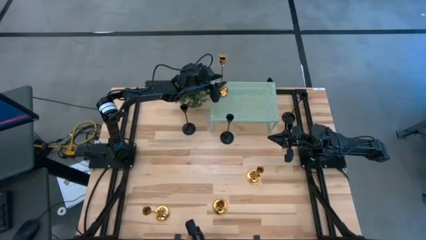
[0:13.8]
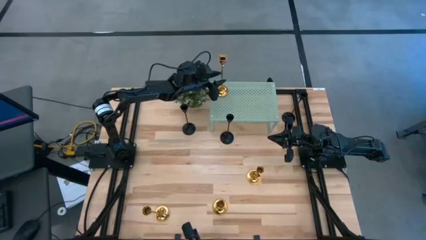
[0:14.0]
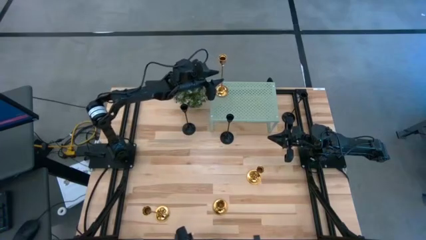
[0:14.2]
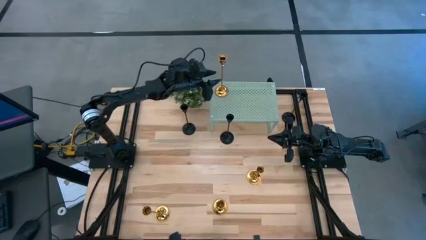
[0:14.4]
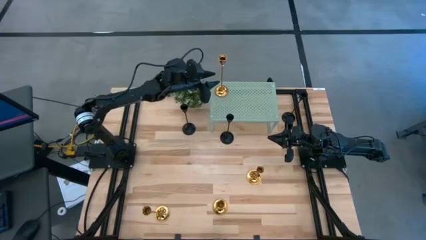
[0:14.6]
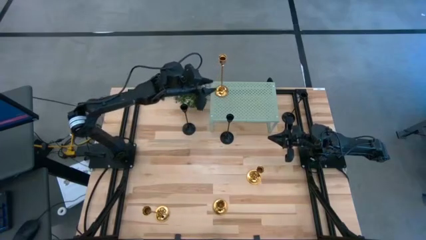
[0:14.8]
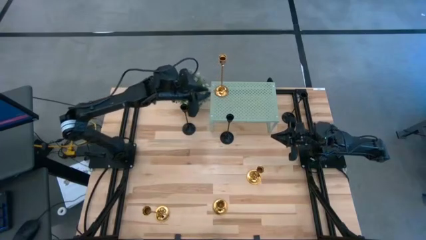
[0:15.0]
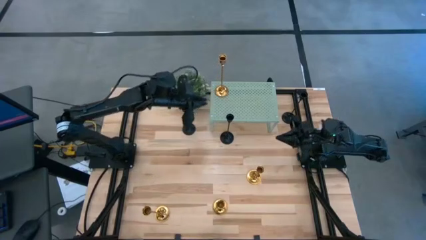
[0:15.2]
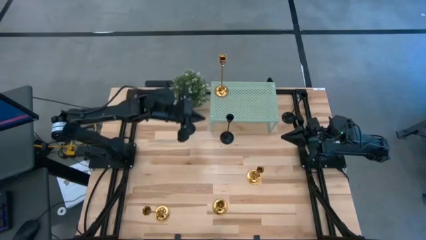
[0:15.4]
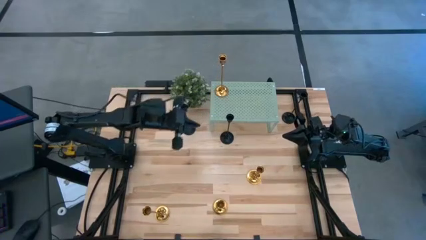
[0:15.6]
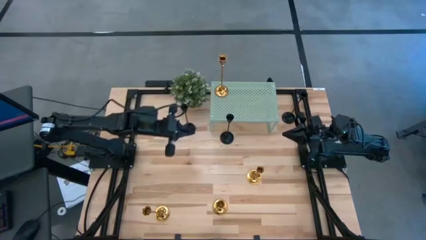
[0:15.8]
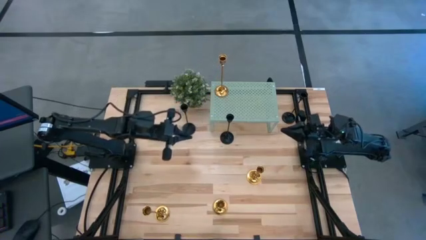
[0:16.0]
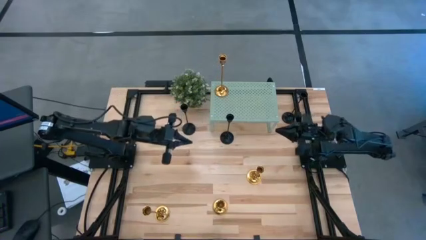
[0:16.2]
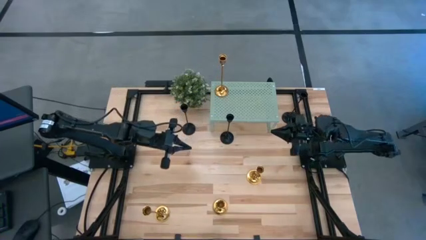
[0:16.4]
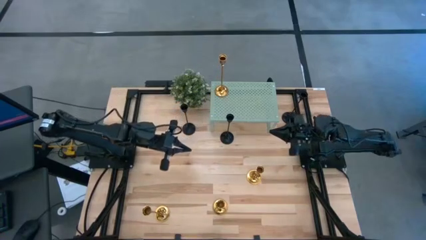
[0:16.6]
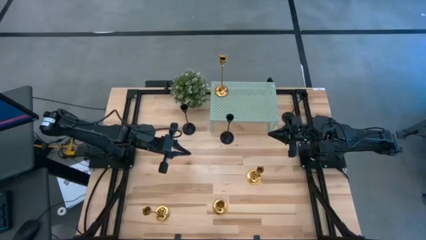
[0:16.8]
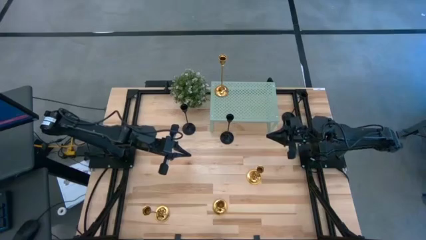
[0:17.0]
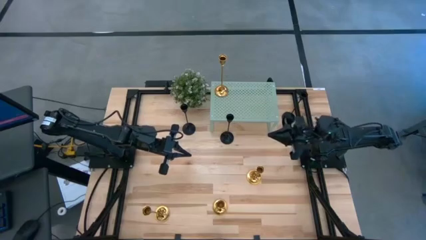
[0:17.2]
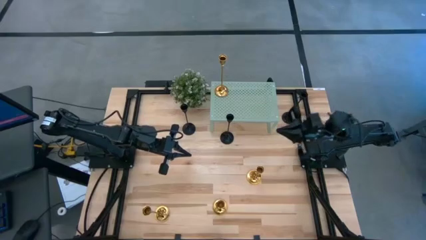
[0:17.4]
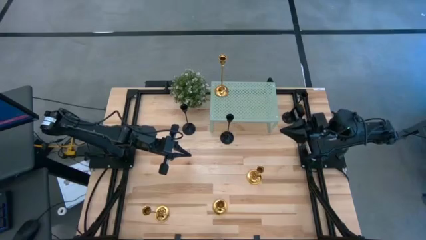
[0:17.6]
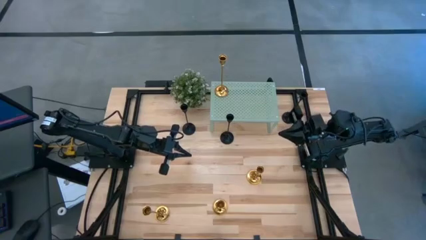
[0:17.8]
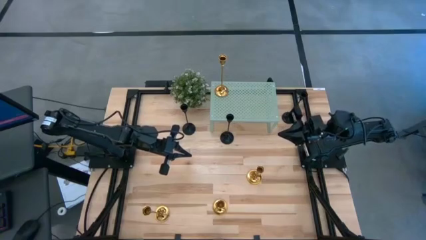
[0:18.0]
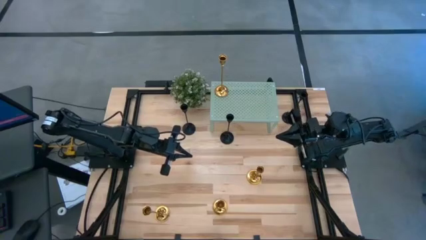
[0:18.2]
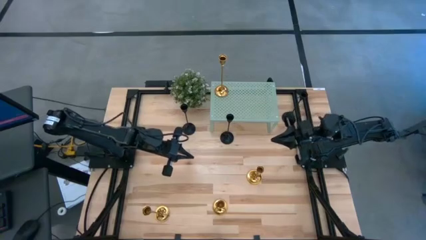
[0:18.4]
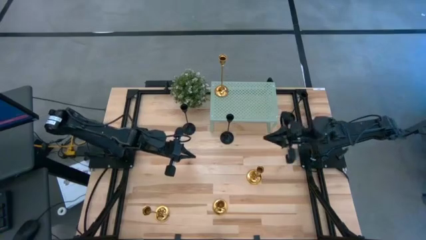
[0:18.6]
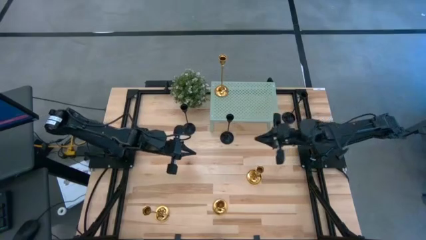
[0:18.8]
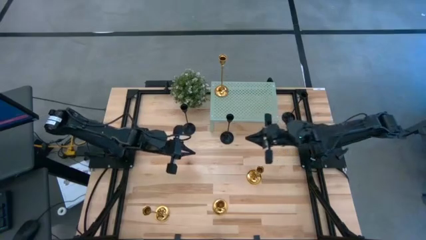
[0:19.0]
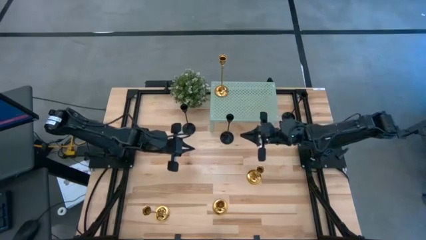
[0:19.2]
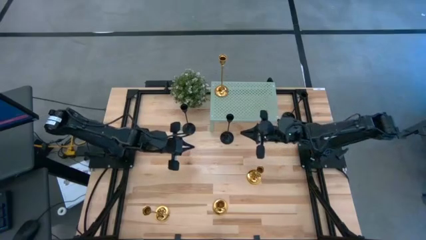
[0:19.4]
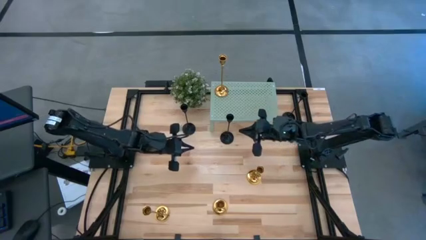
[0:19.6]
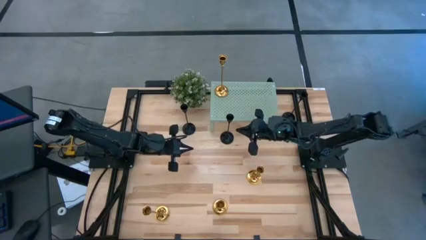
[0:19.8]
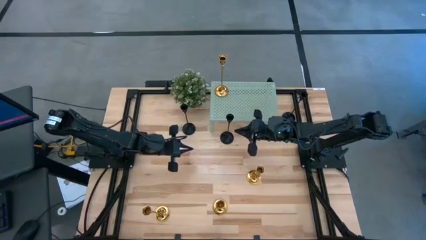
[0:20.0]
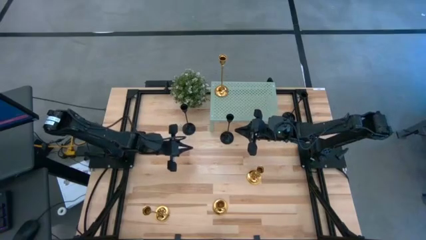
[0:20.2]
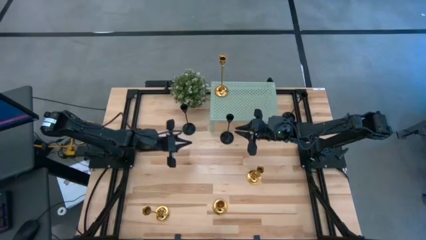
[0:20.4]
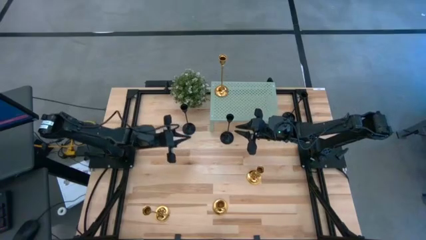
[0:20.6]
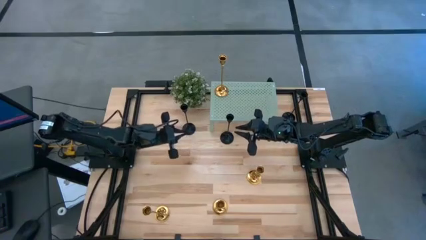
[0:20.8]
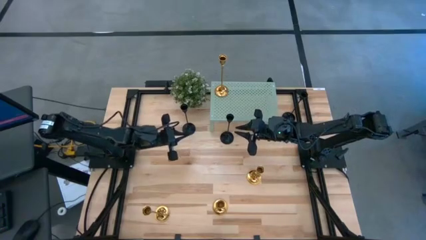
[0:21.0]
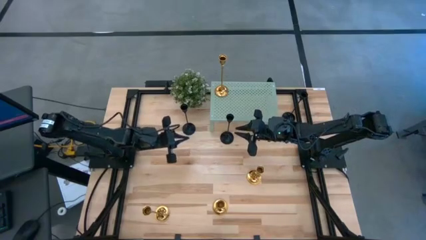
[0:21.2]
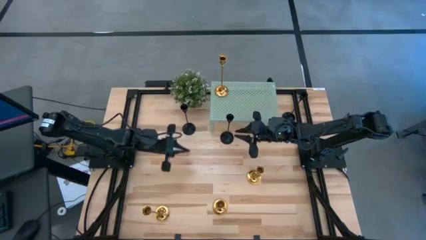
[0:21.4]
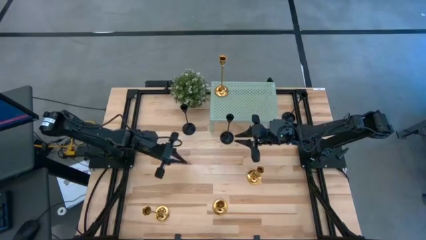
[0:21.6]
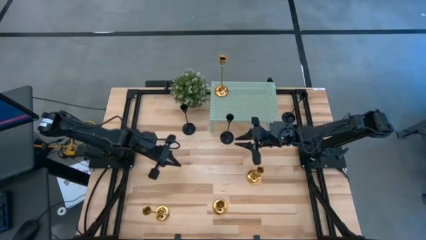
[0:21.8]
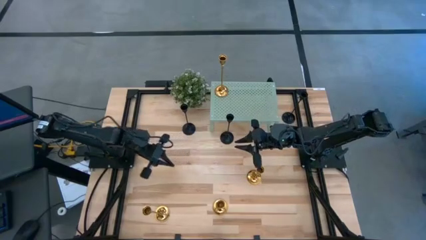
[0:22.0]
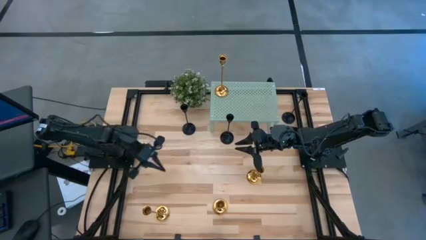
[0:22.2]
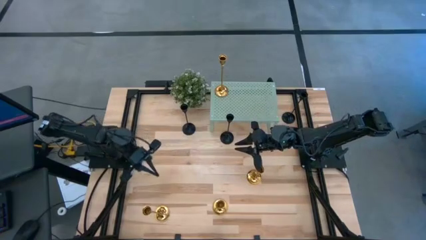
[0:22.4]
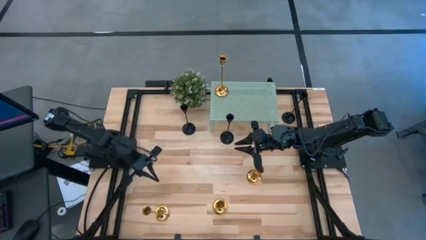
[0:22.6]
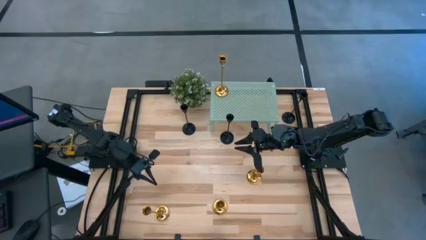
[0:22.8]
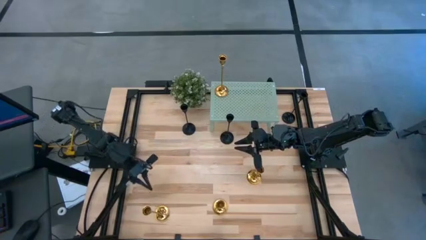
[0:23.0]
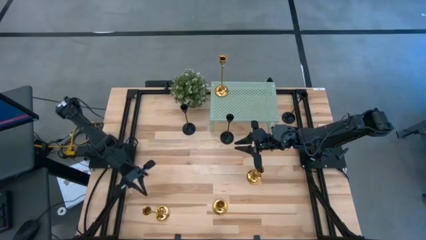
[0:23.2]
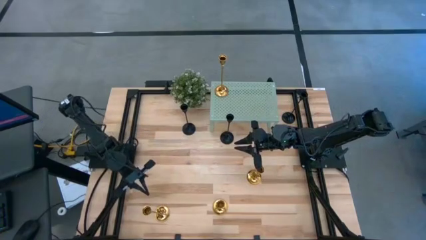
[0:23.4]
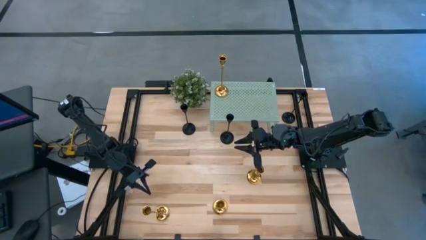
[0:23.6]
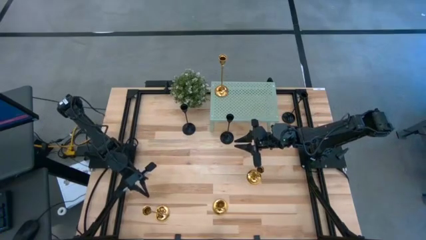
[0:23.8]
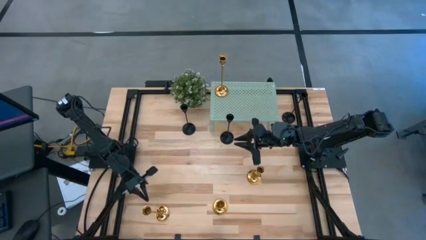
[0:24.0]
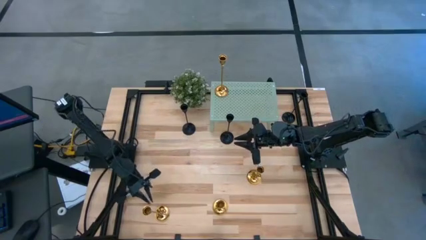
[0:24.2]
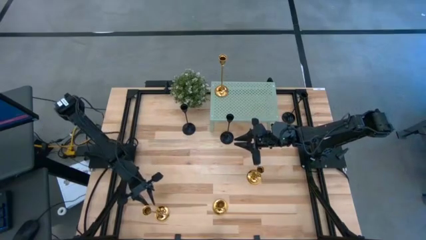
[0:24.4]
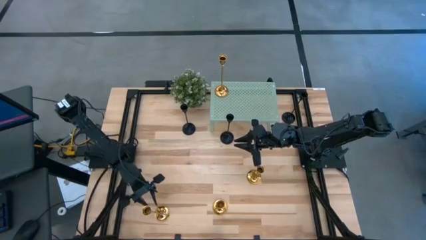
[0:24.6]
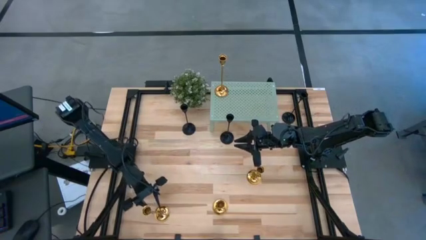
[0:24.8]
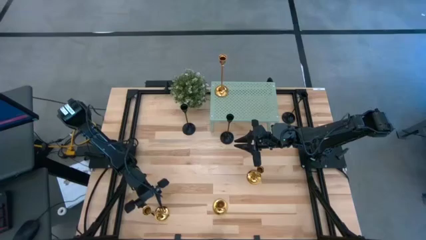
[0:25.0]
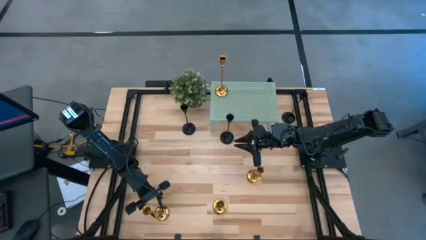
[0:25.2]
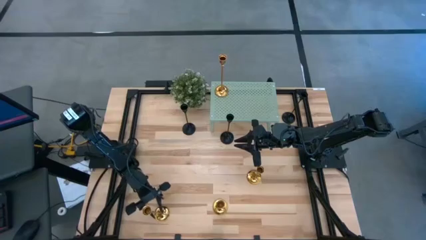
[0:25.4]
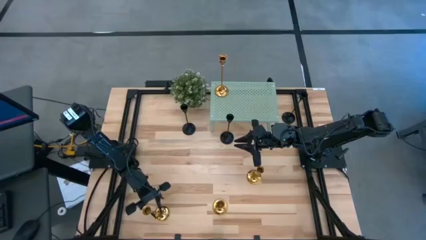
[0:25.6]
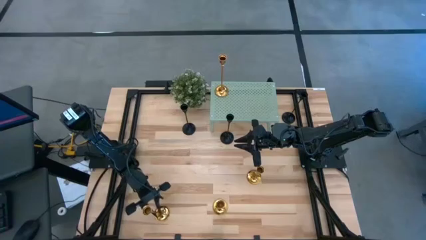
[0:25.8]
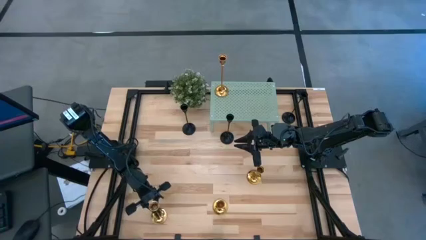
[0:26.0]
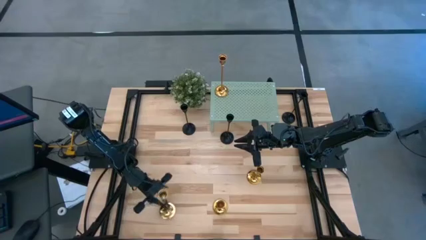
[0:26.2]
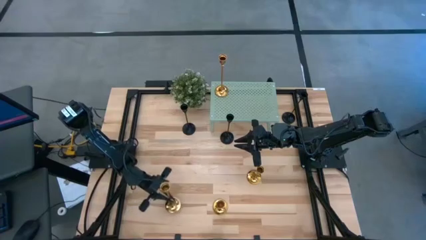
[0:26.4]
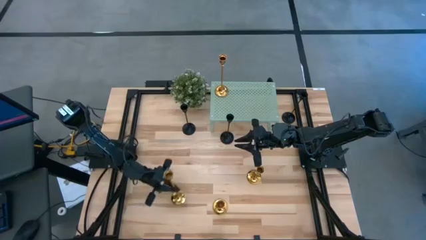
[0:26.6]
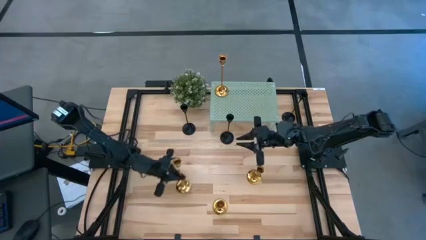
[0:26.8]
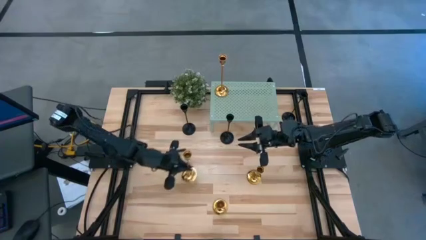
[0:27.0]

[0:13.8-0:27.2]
Task: Pick & Place candle stick holders
Put the gold candle holder on the shelf

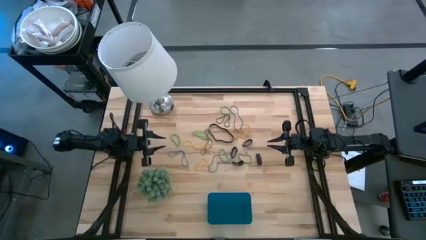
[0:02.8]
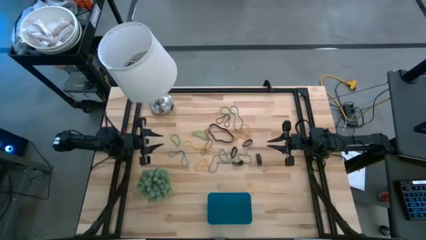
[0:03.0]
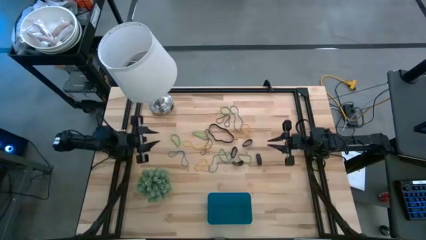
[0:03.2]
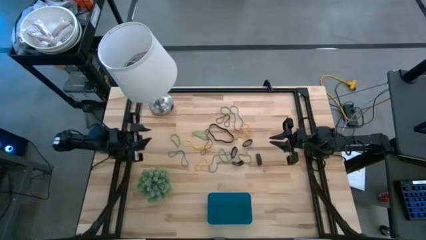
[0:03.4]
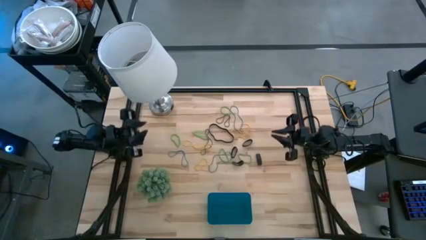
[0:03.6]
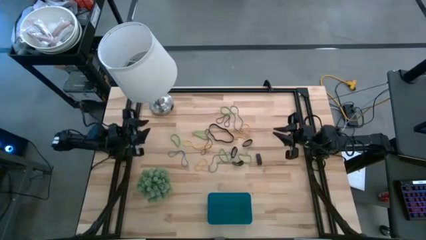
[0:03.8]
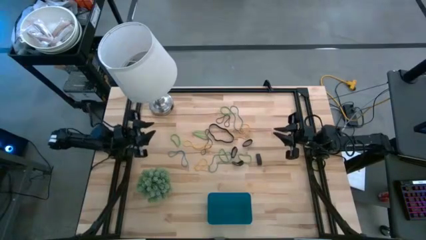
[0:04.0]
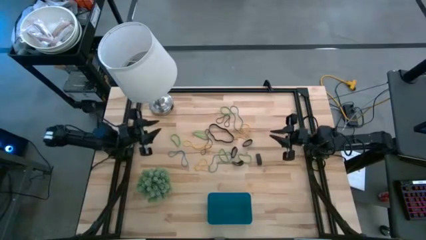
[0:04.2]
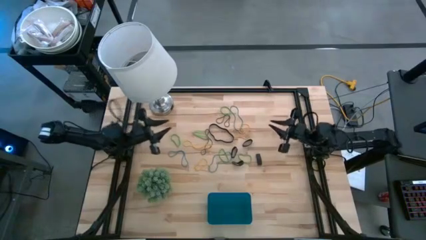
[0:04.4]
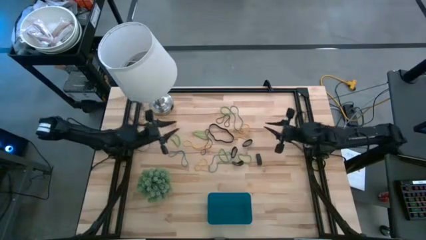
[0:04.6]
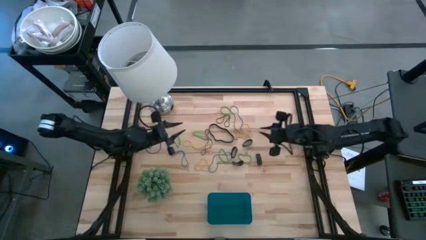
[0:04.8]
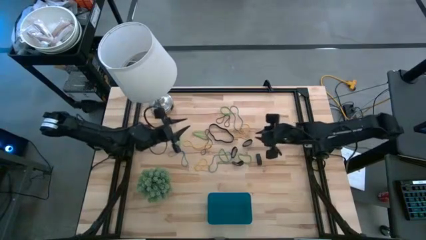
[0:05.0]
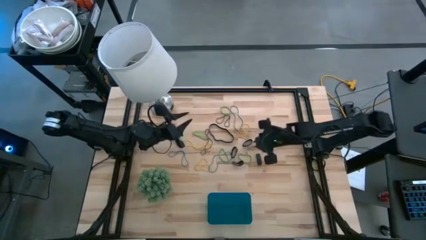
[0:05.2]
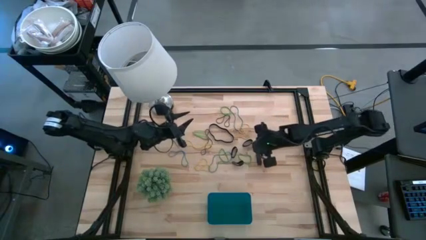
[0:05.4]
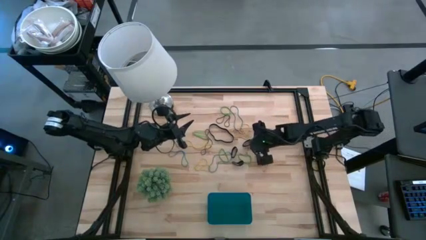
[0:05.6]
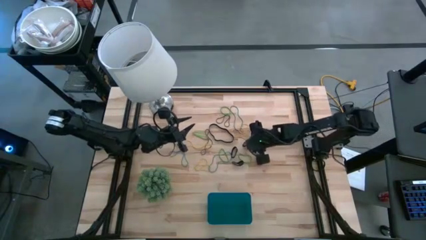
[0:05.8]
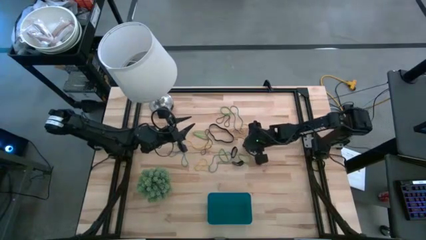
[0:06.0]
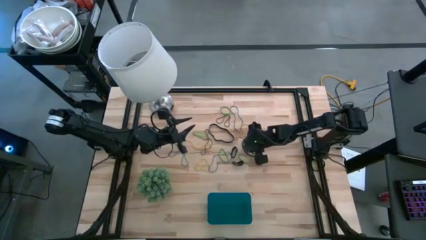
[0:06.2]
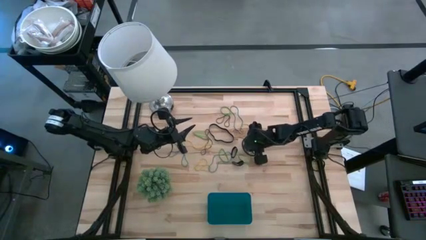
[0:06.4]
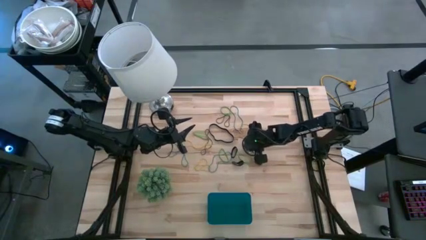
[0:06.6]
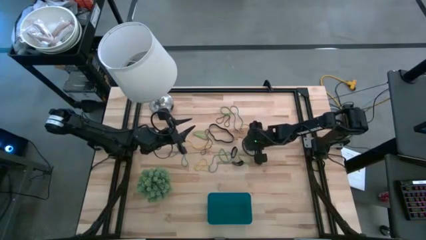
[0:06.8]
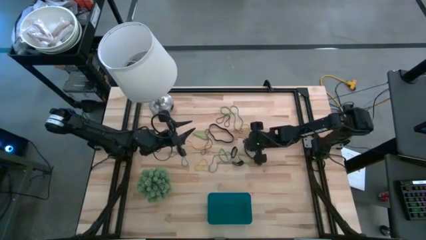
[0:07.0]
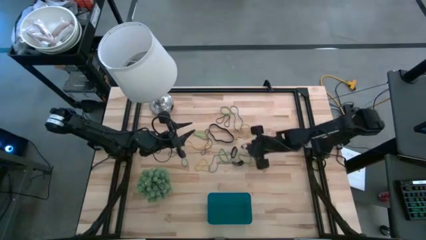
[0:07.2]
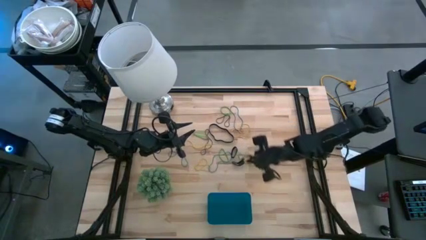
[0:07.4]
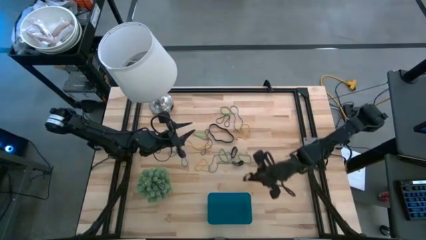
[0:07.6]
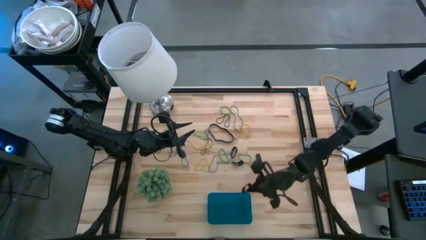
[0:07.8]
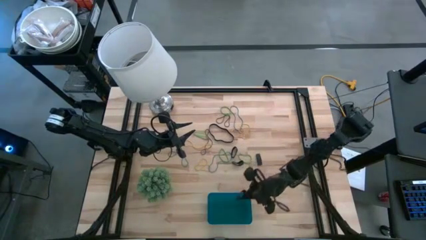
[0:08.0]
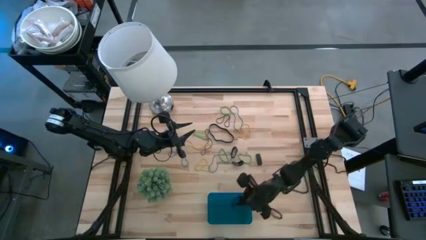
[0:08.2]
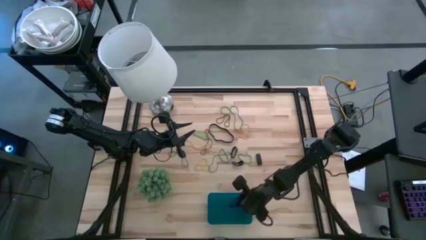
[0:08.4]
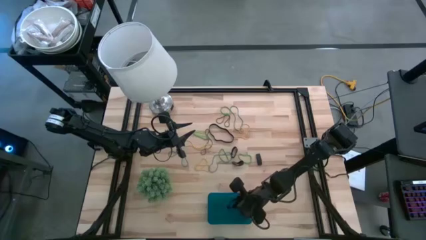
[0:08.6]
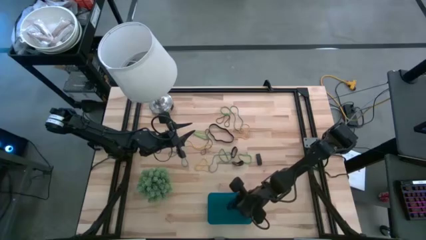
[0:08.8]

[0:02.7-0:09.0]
Task: Pick and place rubber bands into bin
Put the black rubber band into the blue bin
